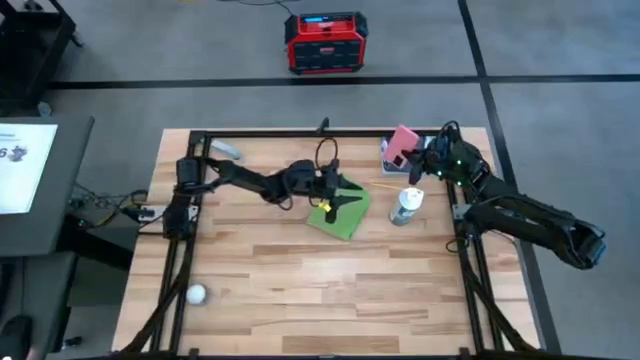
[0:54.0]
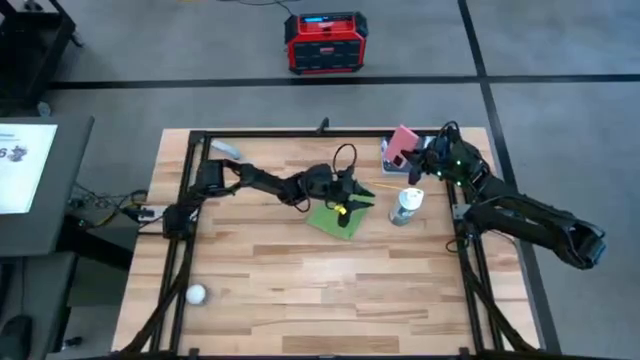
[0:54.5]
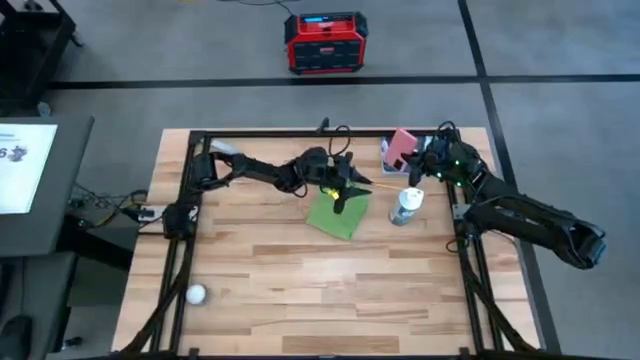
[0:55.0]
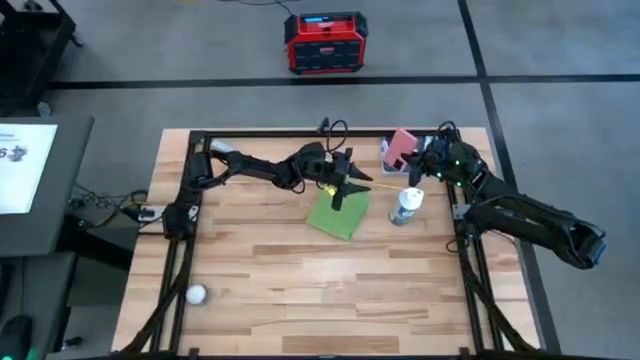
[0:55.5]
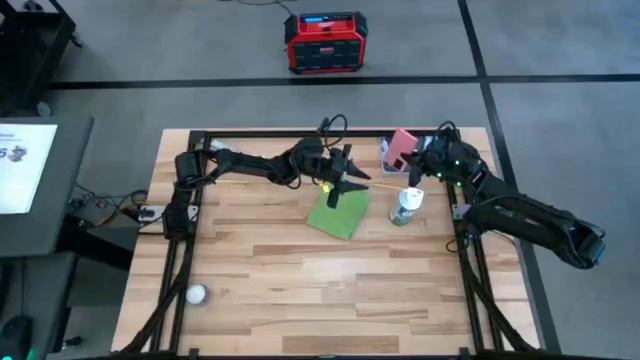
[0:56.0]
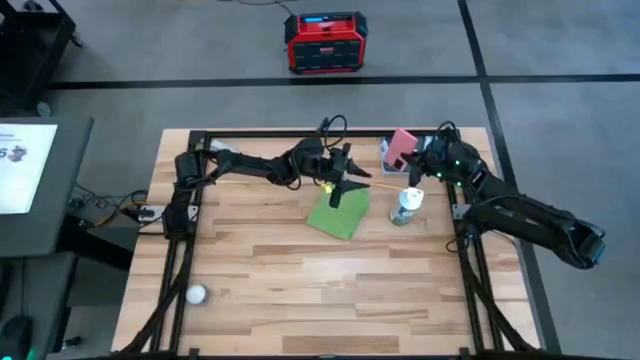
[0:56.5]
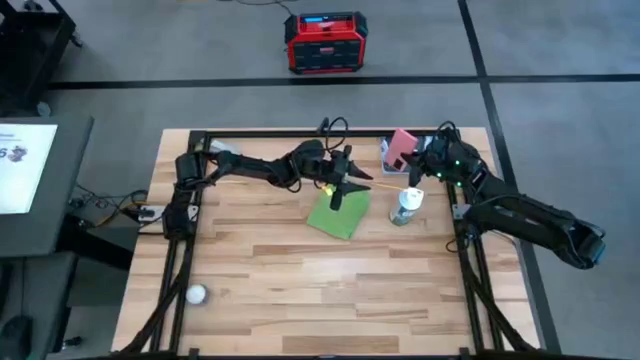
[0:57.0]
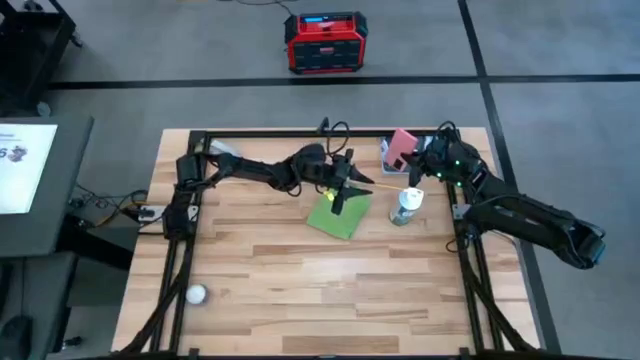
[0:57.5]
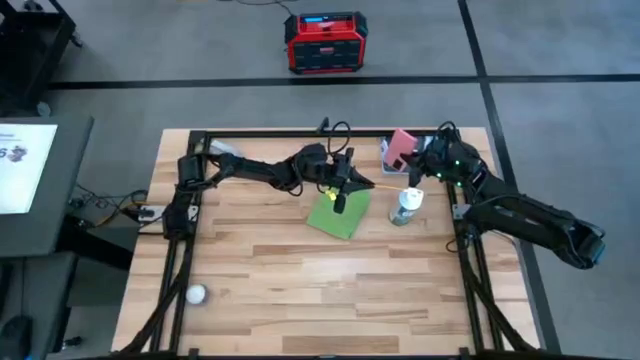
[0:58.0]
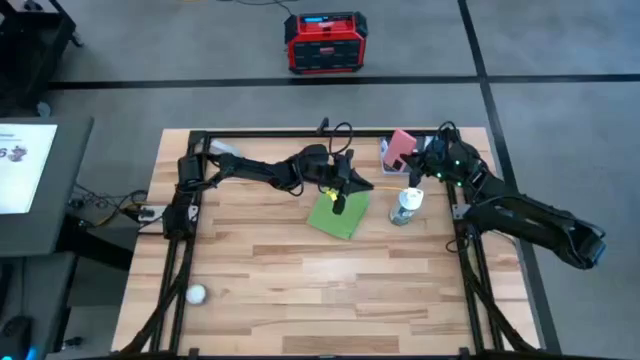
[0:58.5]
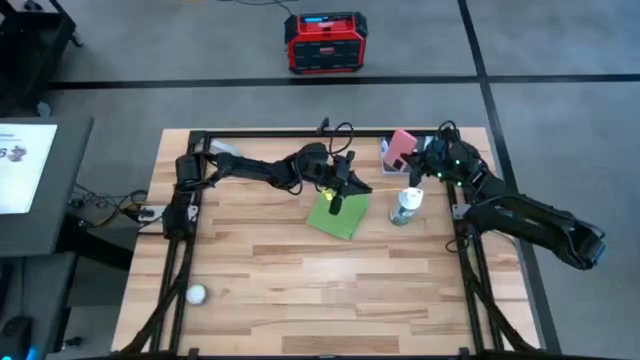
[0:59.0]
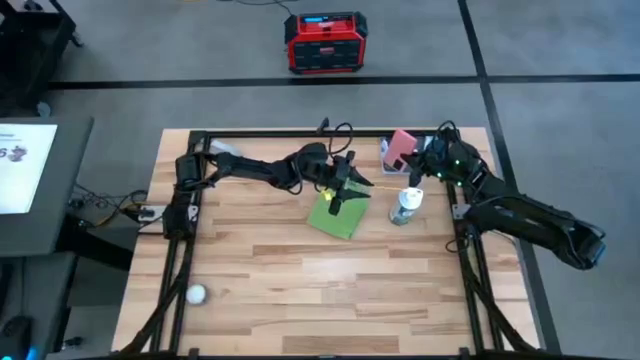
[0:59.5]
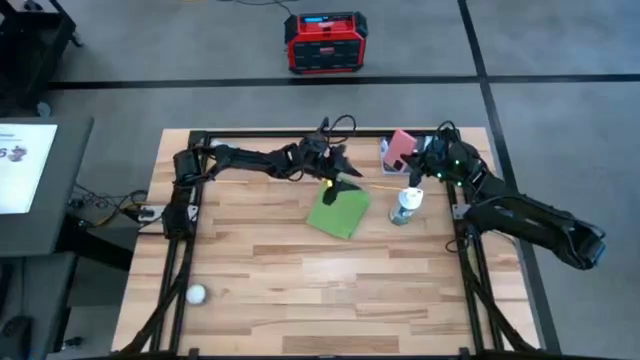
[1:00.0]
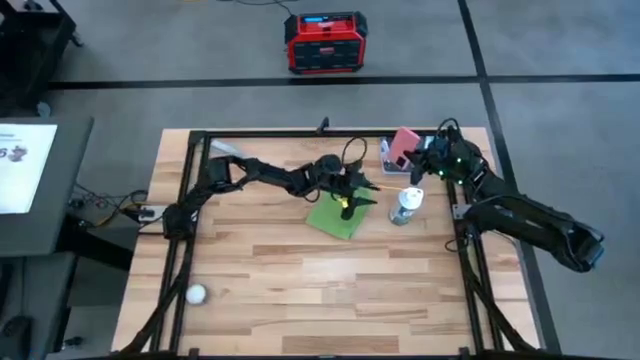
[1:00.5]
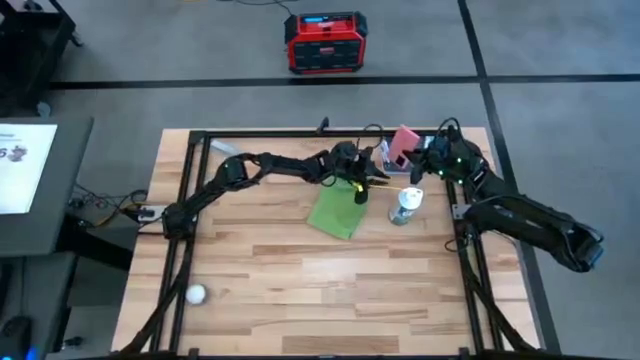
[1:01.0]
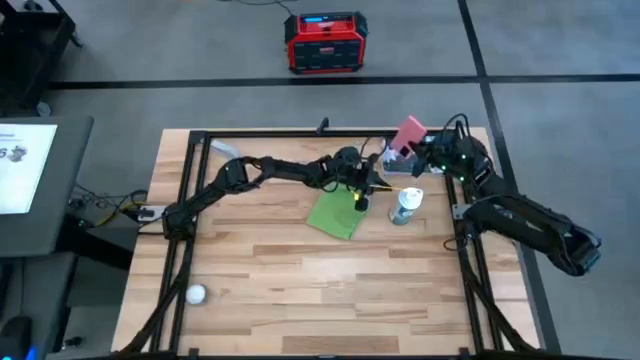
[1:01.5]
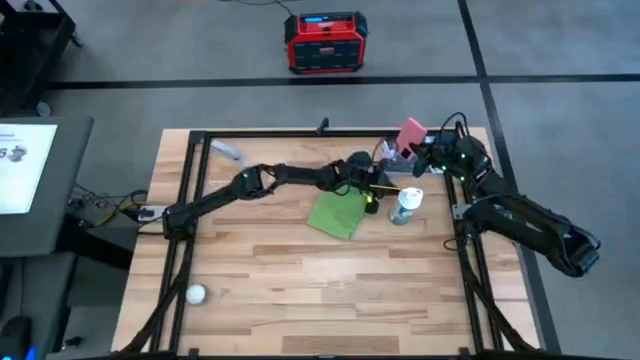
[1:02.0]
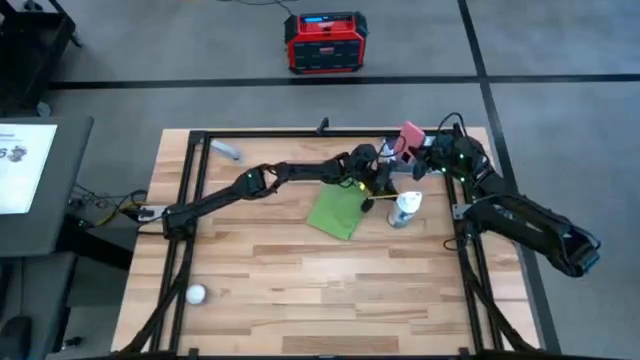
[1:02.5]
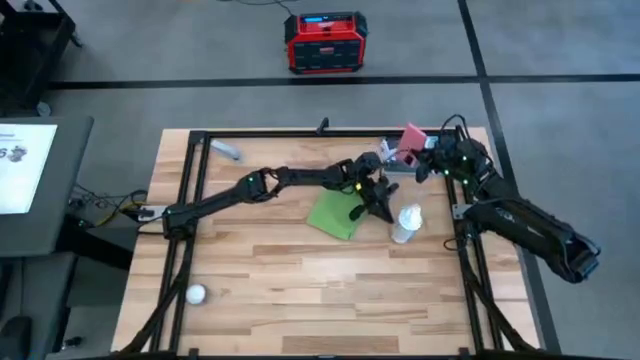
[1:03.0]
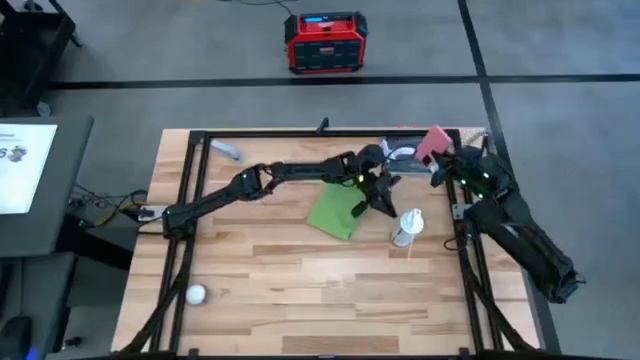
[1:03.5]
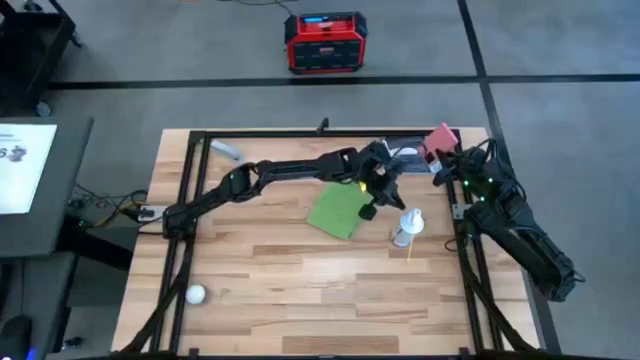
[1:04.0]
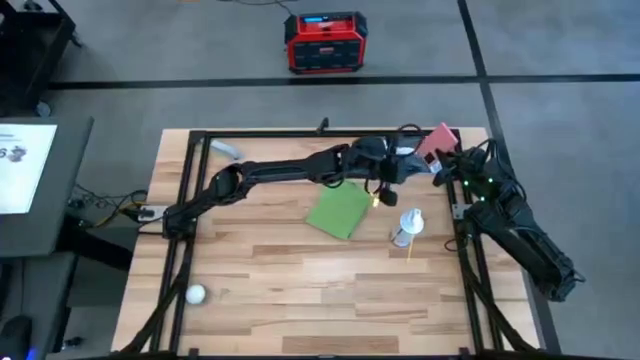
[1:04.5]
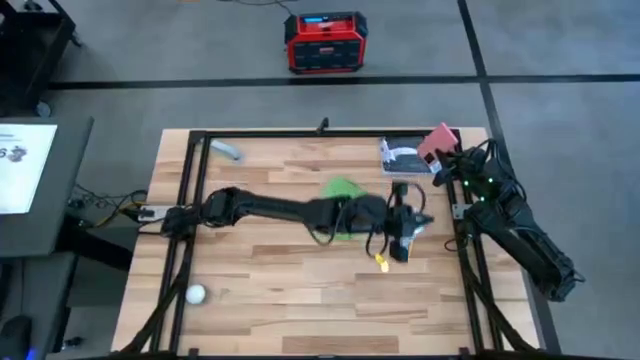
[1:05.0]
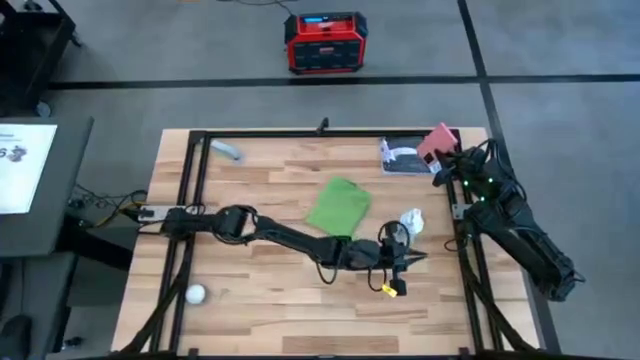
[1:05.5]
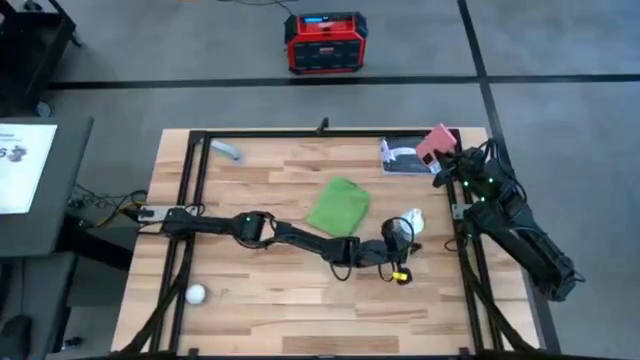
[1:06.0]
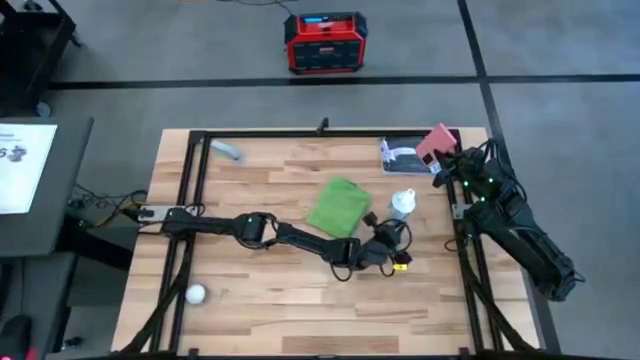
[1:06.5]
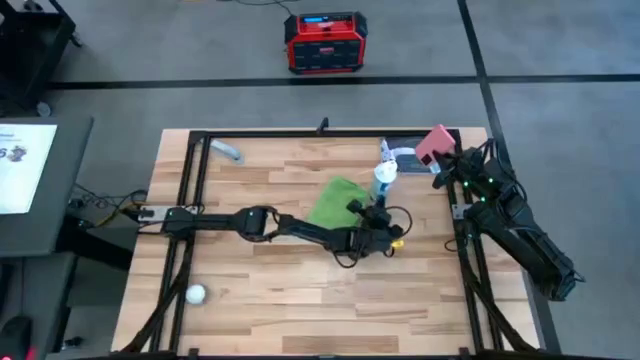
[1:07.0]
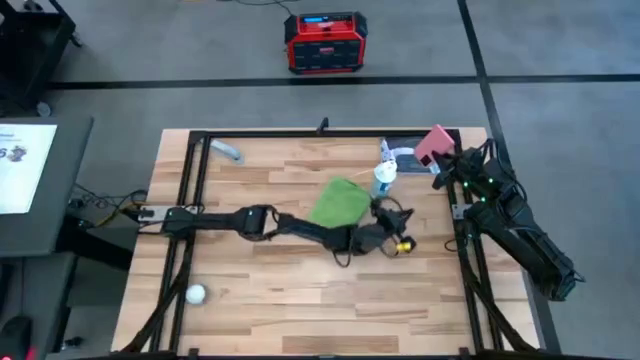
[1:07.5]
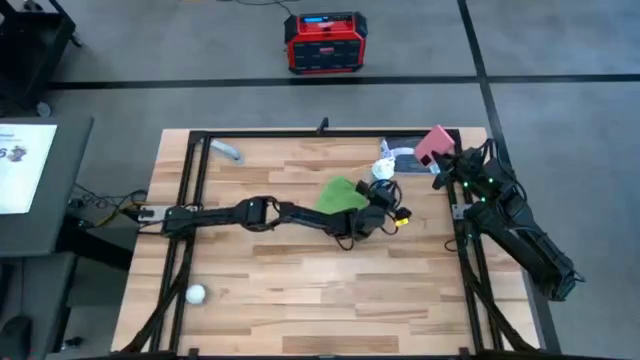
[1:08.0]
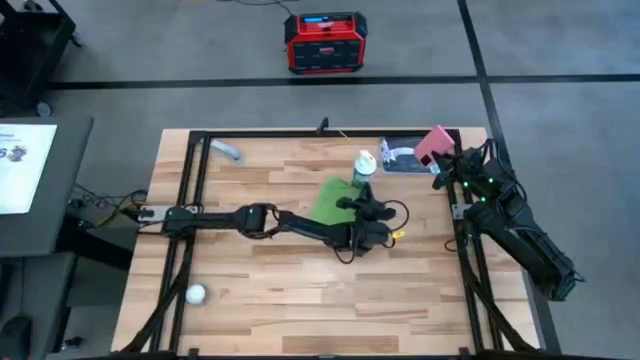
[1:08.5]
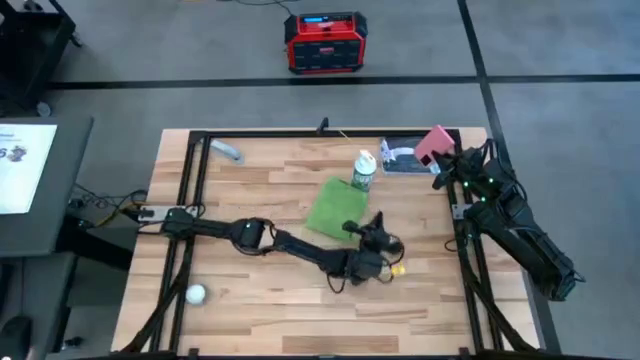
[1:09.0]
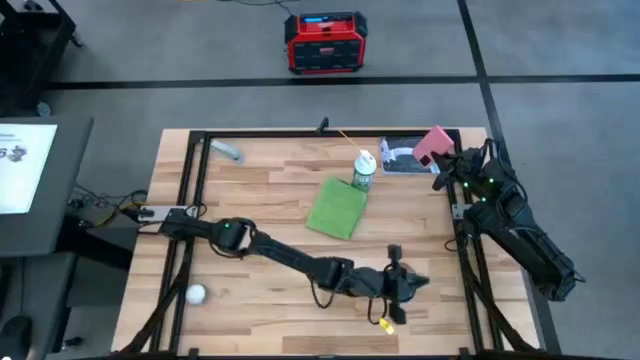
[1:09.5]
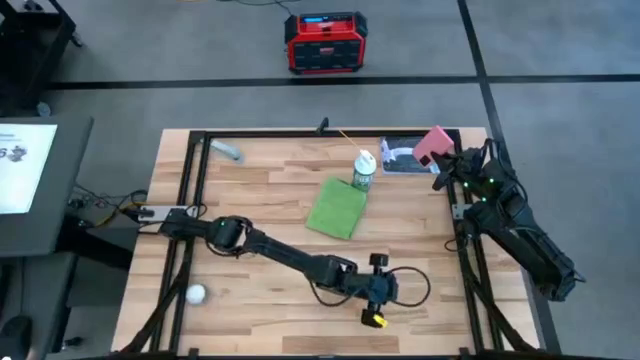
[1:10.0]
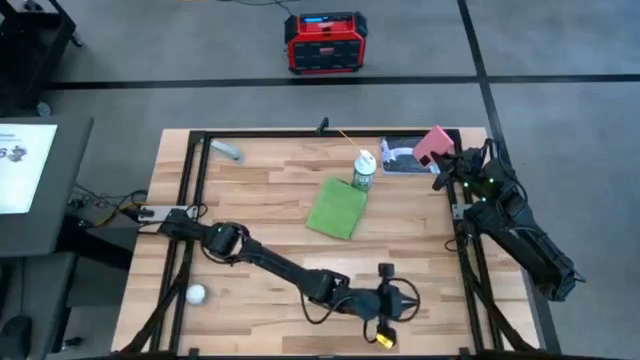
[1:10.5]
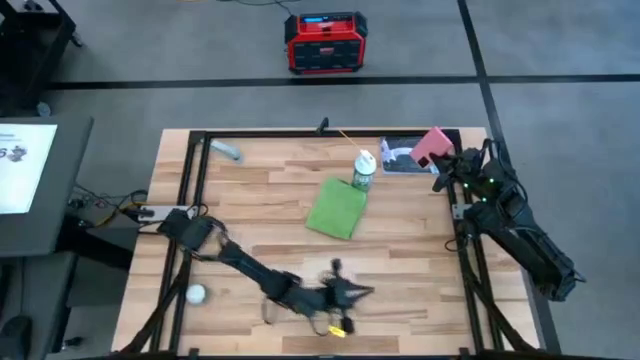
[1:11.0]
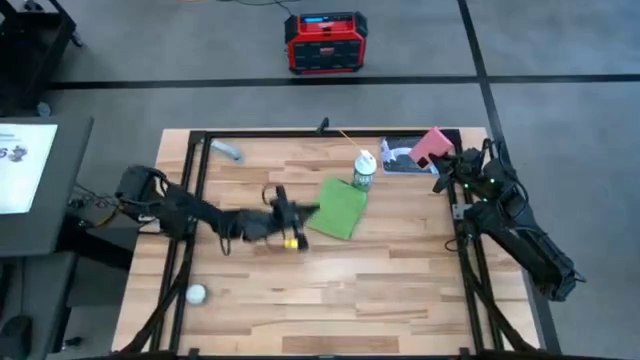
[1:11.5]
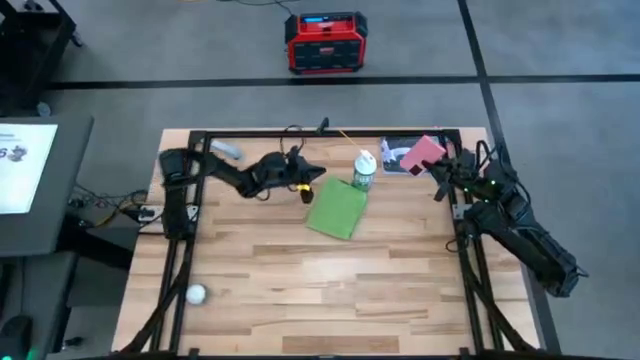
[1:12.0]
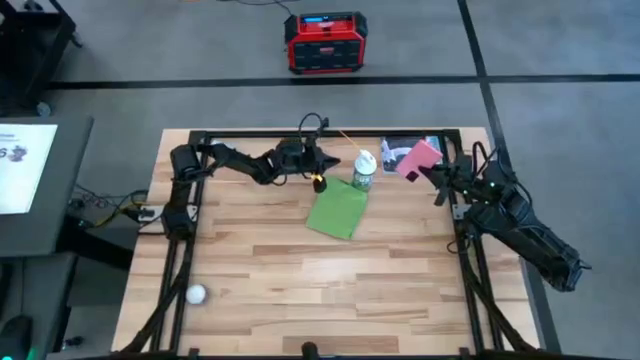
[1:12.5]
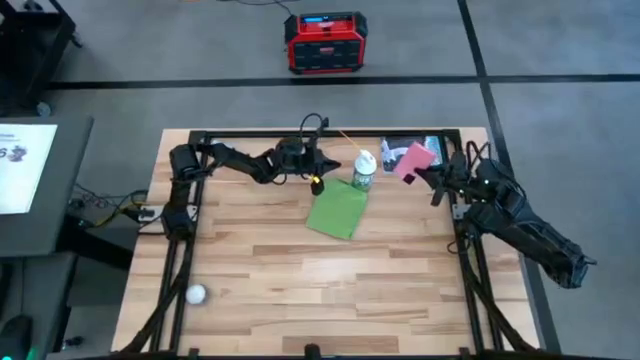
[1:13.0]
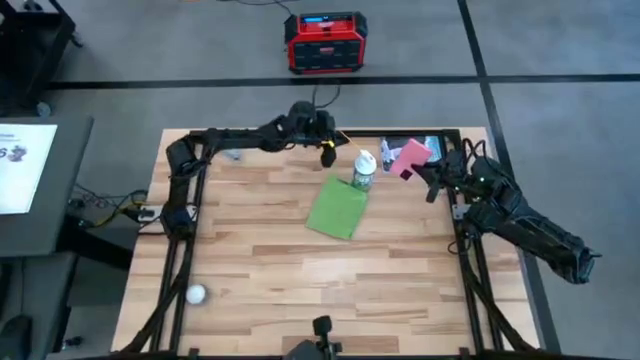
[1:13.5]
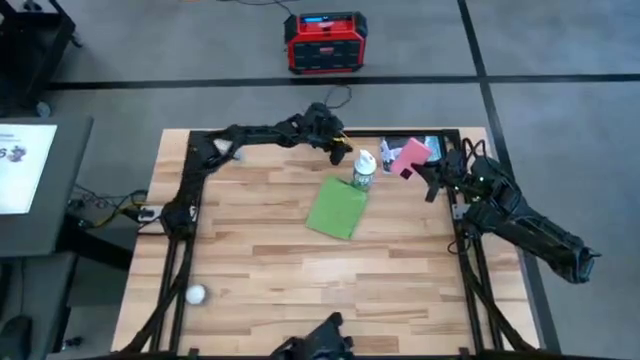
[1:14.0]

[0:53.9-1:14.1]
Task: Apply microfiber cloth
Spray the cellphone using the cleaning bottle
